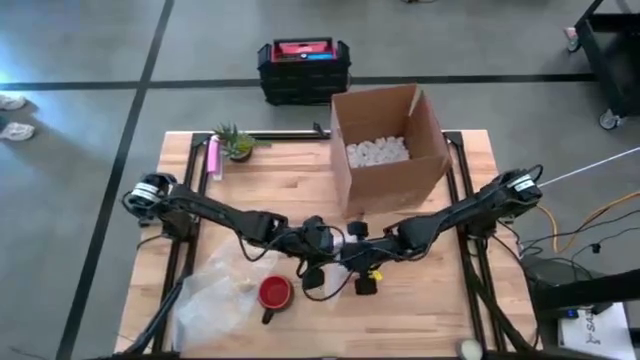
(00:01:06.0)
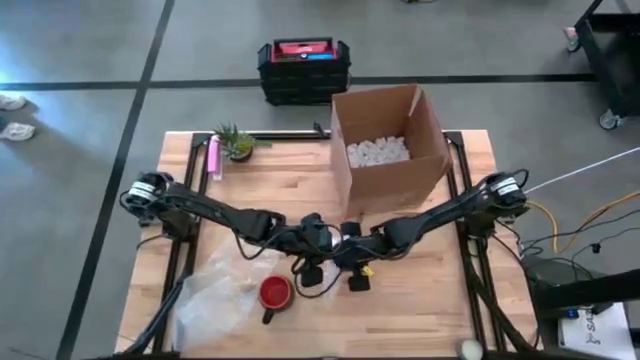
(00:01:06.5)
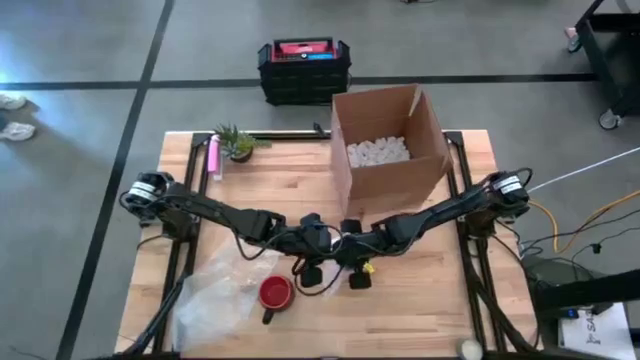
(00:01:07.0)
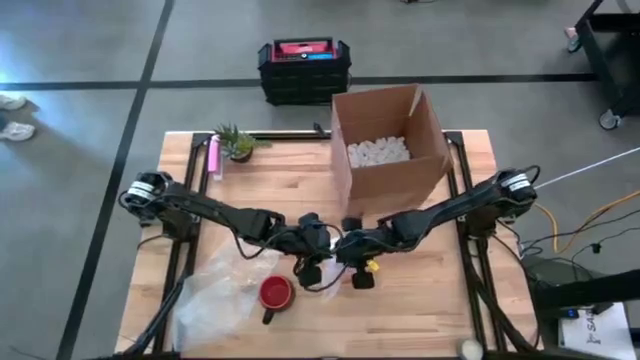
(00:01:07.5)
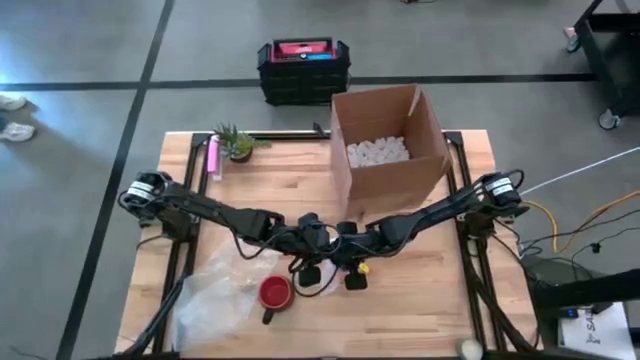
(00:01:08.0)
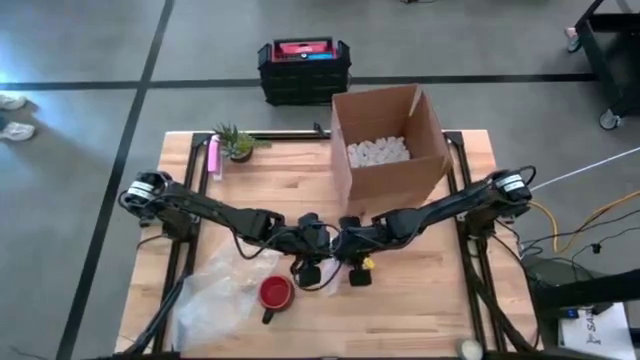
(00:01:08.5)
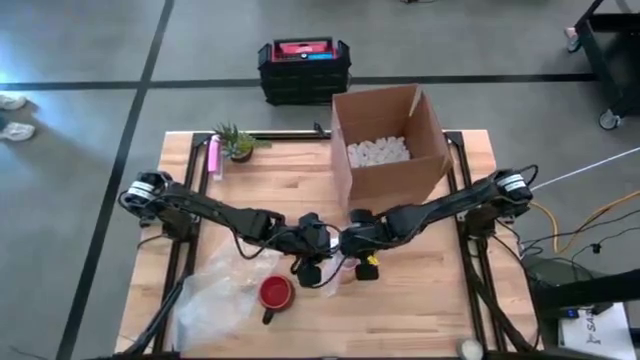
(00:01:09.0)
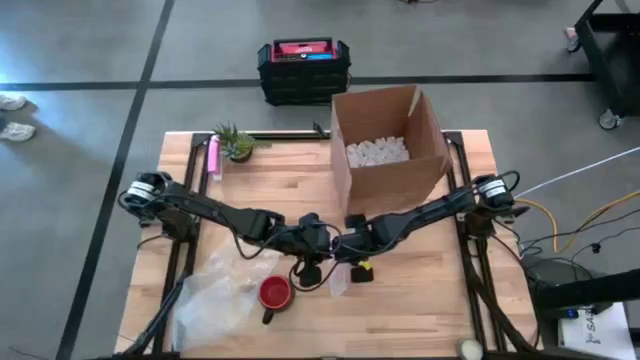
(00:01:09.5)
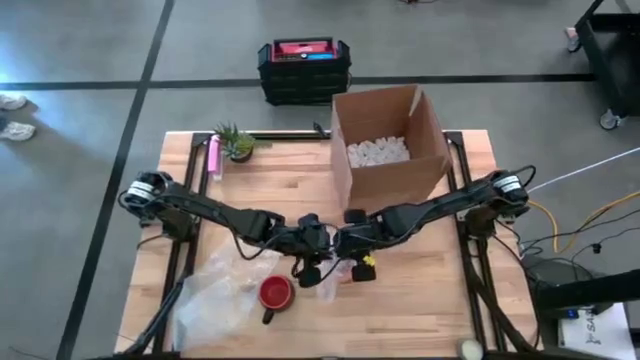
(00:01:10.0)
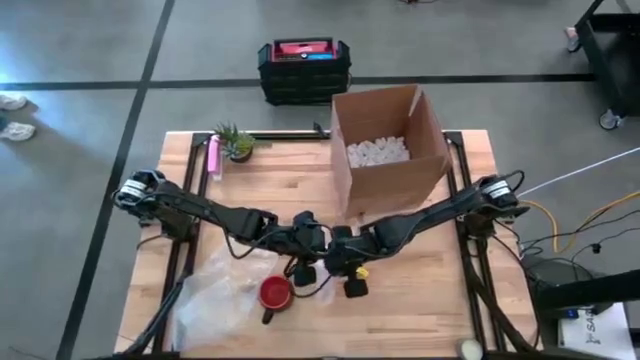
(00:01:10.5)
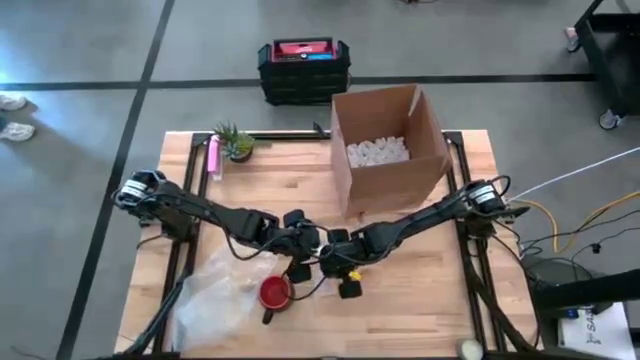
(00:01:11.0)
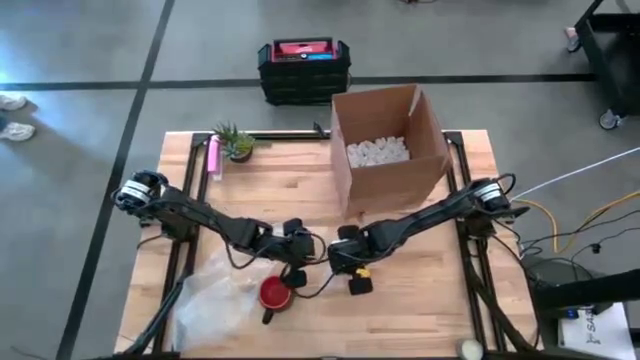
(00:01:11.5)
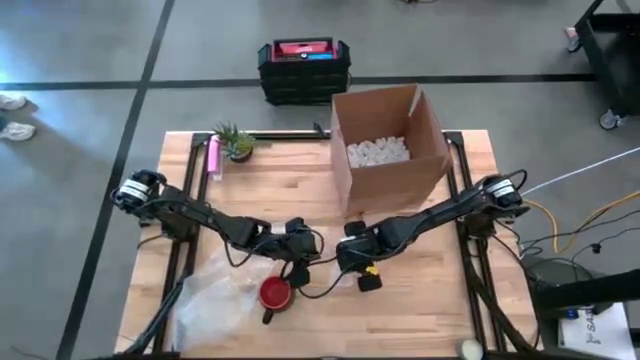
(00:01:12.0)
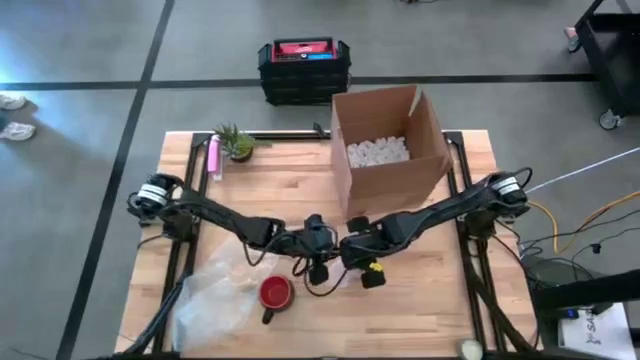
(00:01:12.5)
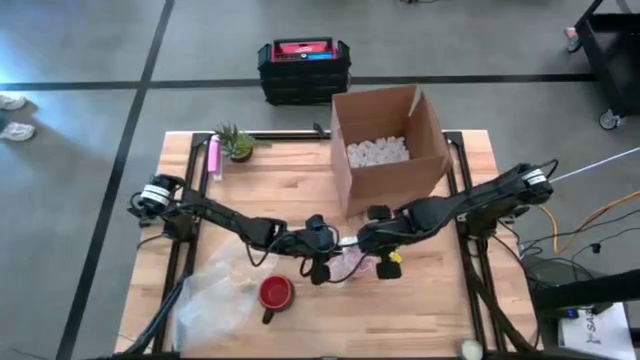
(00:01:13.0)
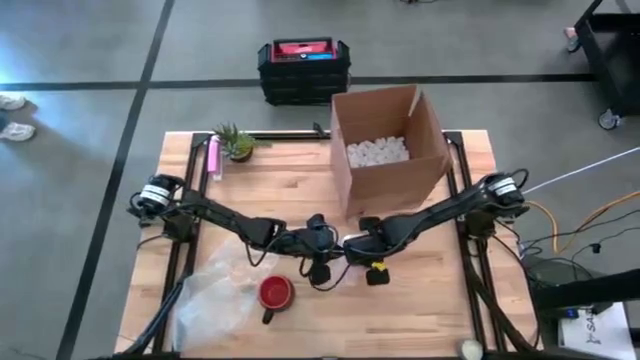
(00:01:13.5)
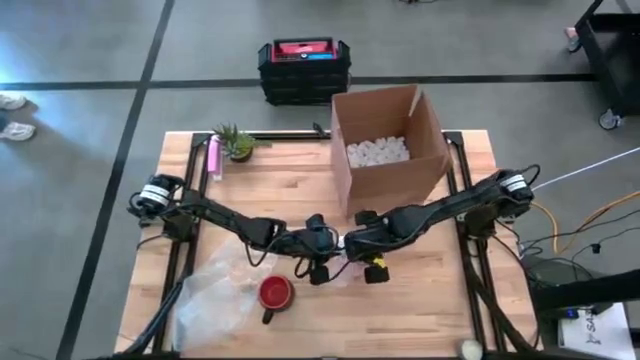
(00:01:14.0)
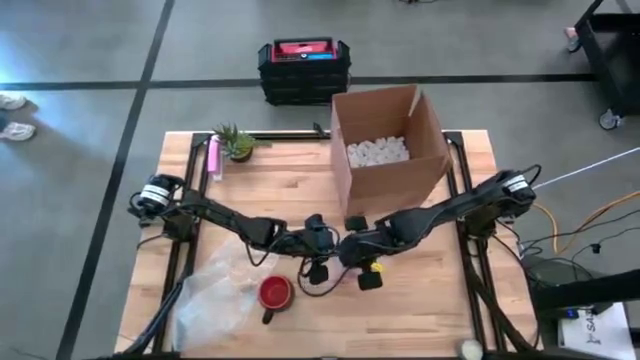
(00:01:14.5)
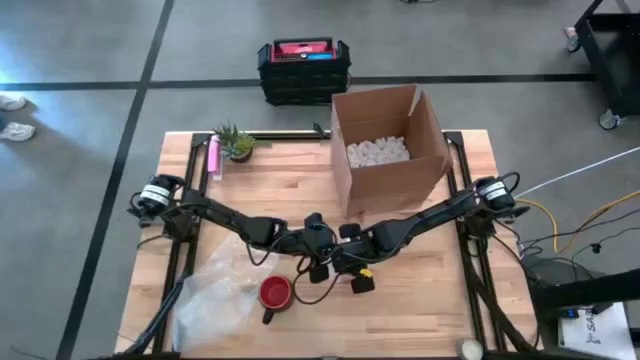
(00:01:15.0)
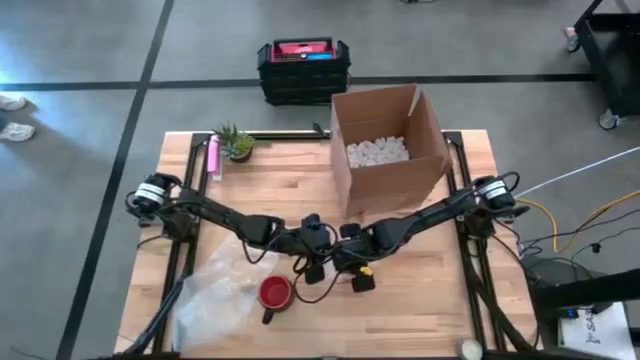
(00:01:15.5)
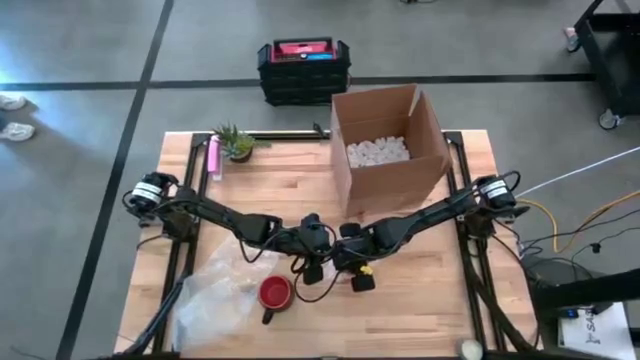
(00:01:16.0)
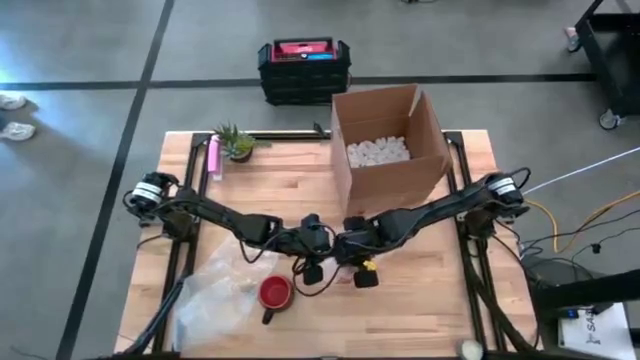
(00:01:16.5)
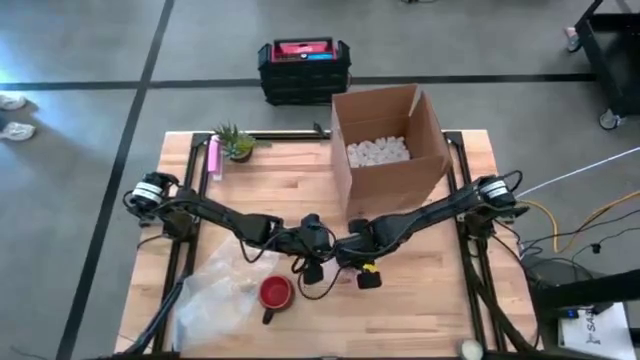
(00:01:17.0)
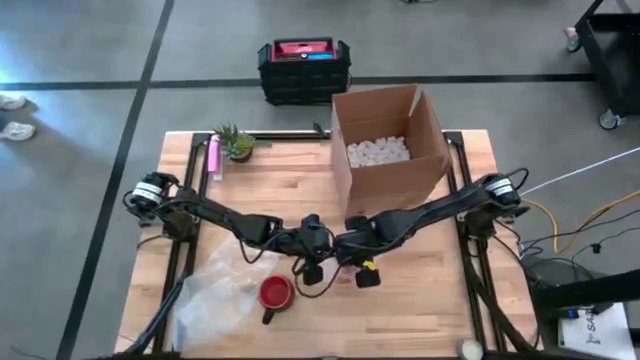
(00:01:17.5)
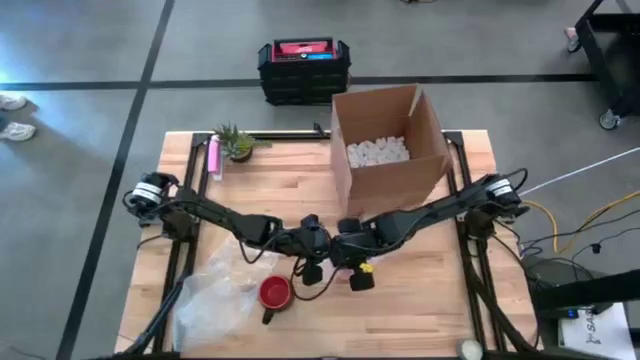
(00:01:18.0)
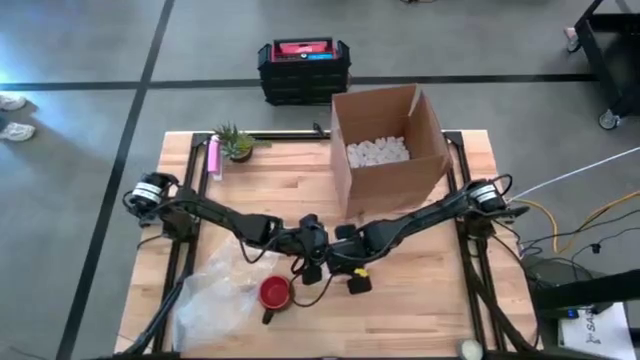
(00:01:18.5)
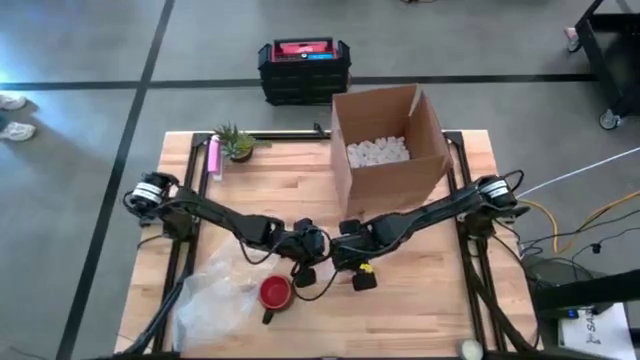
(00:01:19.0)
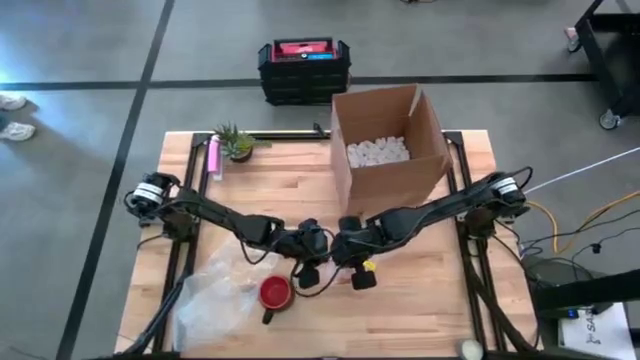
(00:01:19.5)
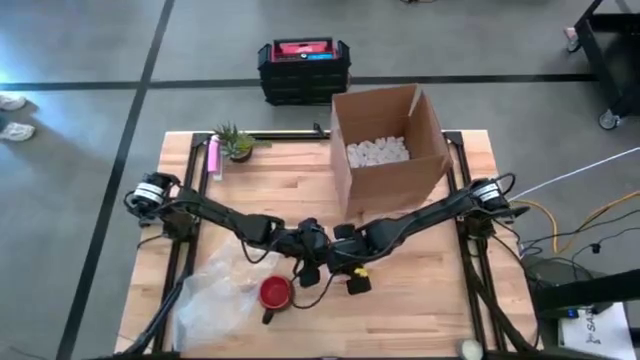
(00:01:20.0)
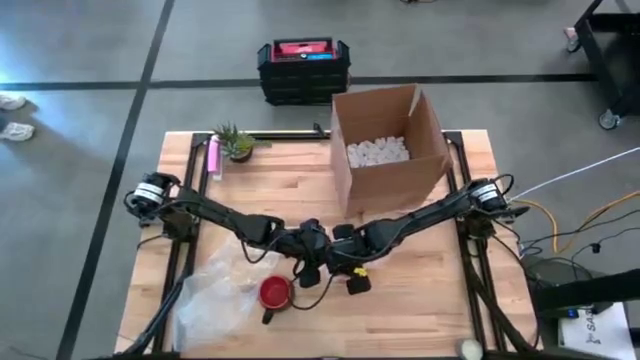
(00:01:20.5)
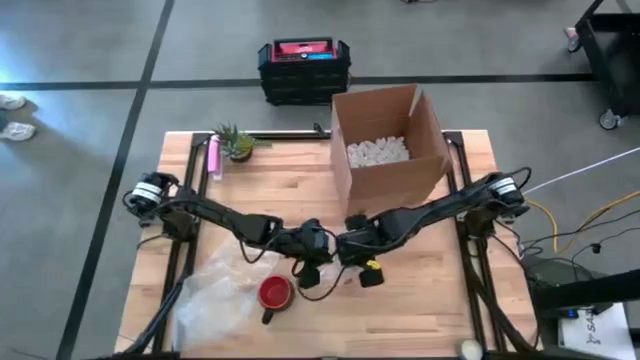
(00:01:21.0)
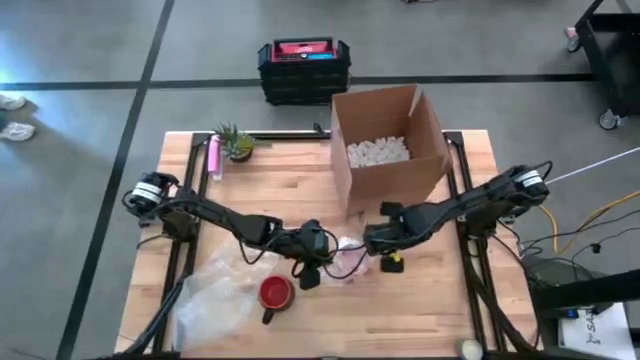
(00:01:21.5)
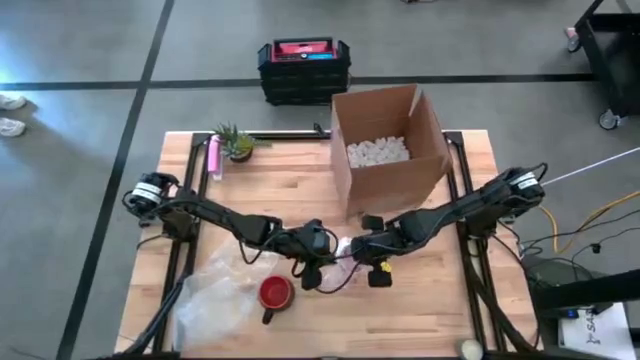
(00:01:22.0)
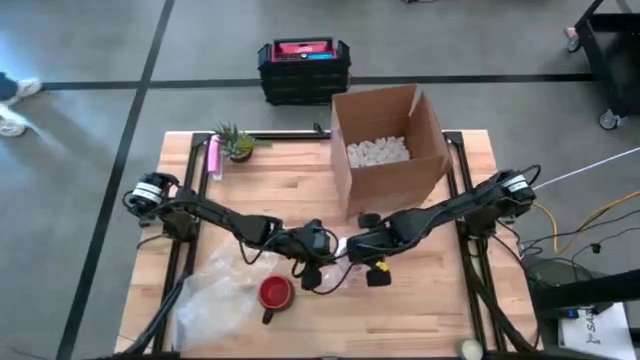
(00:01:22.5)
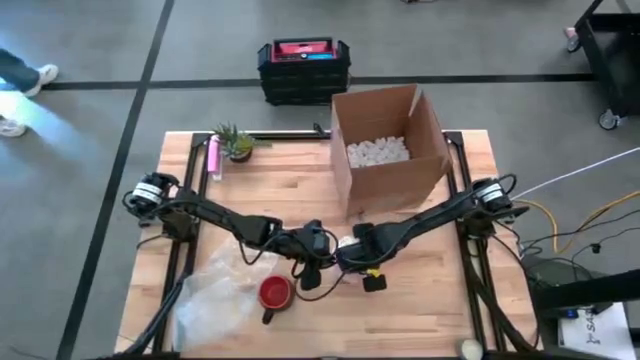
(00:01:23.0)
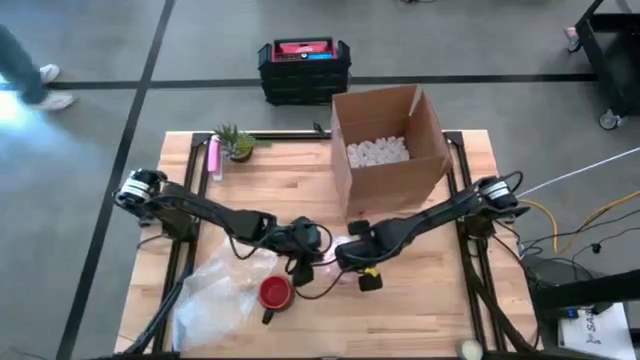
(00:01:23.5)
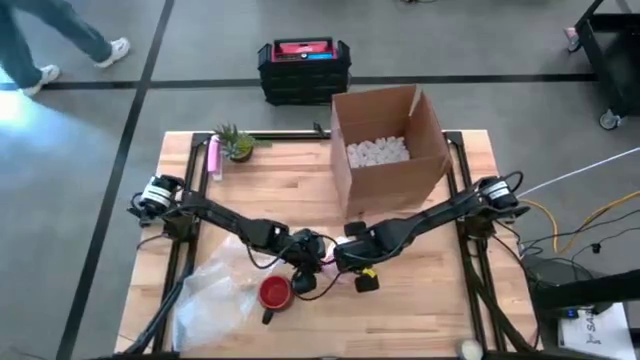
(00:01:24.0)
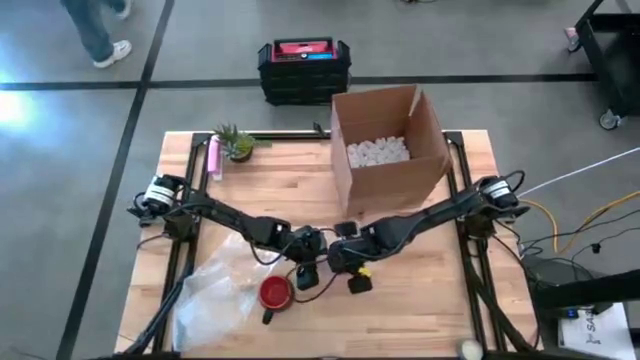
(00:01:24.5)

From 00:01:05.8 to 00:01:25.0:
Task: wrap mug
Wrap the orange mug with the right transparent bubble wrap

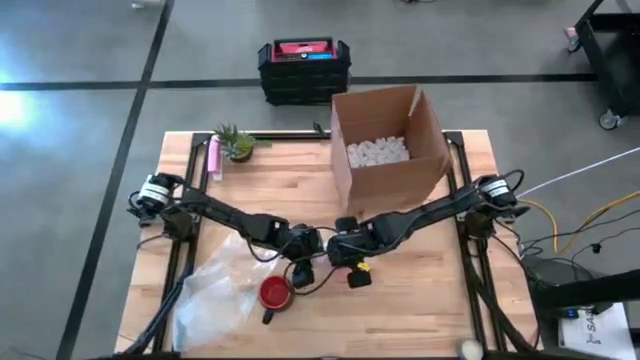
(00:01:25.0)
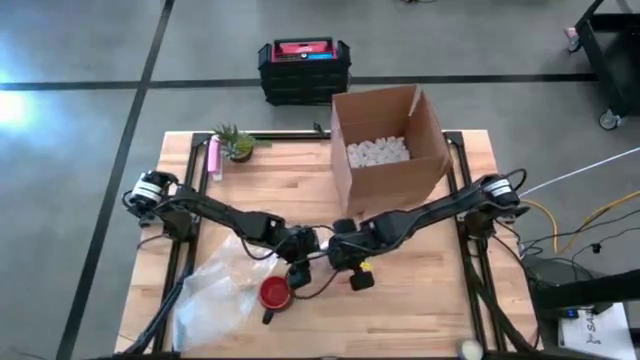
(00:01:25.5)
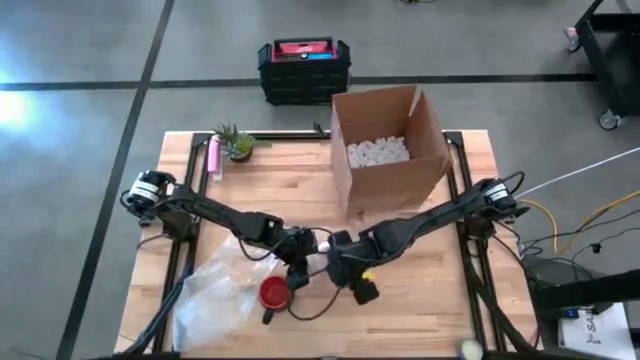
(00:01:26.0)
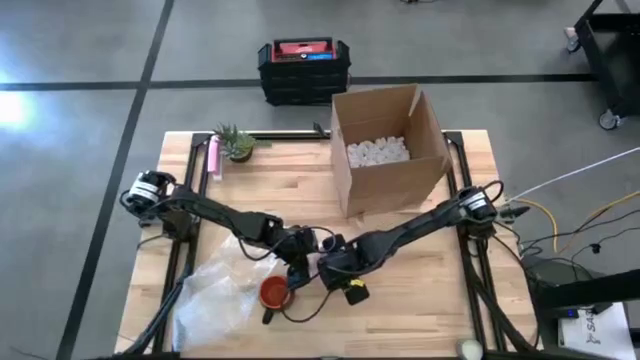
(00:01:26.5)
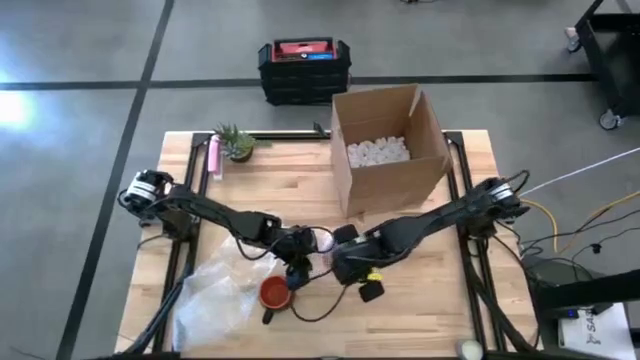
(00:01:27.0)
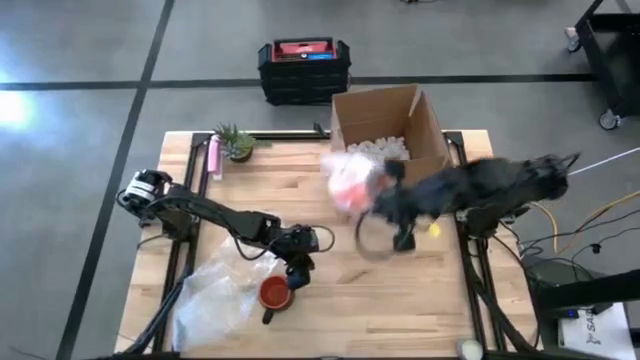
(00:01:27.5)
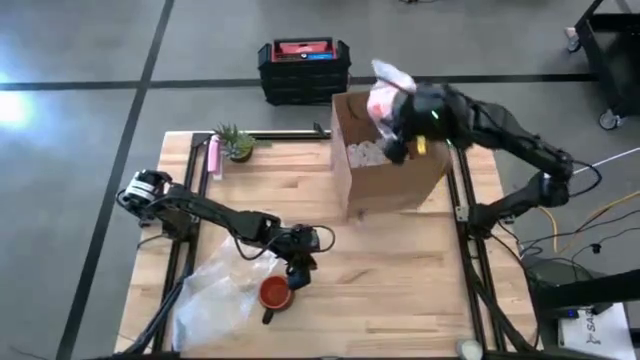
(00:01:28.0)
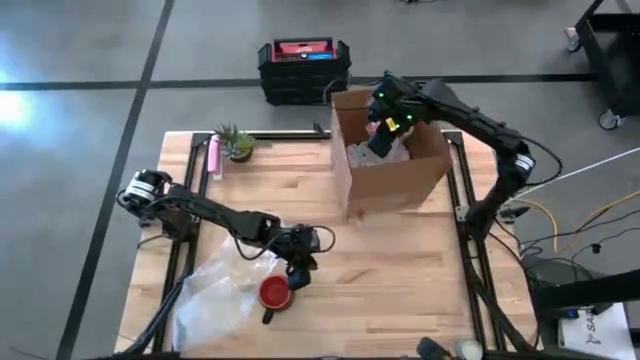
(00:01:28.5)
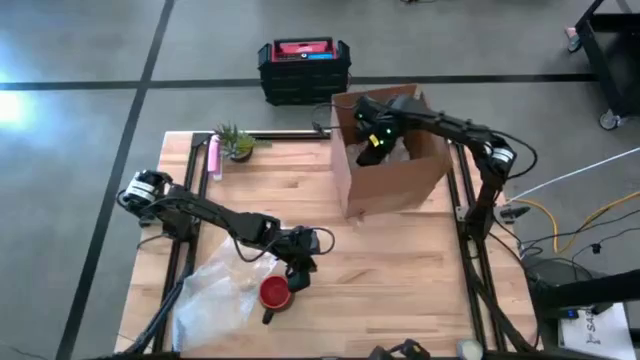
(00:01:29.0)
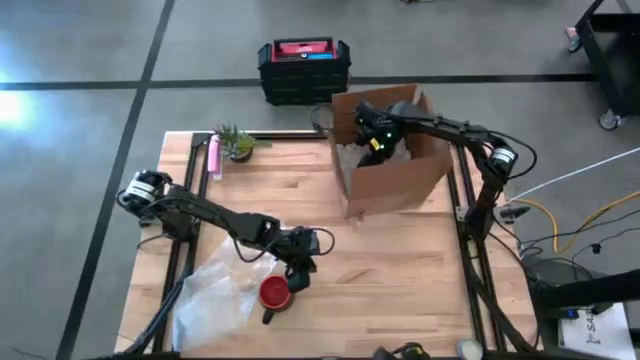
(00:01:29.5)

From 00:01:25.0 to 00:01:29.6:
Put the wrapped orange mug into the brown cardboard box
